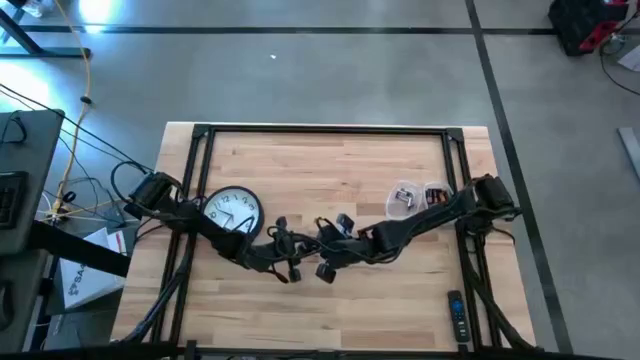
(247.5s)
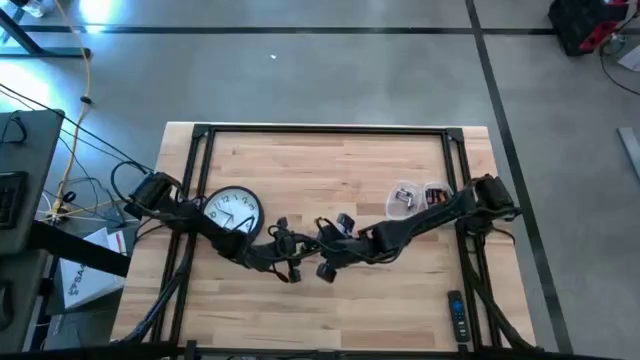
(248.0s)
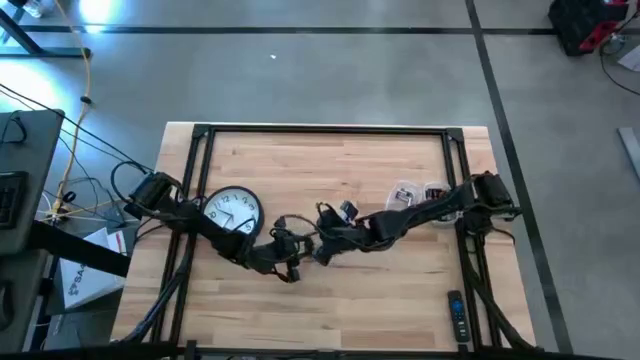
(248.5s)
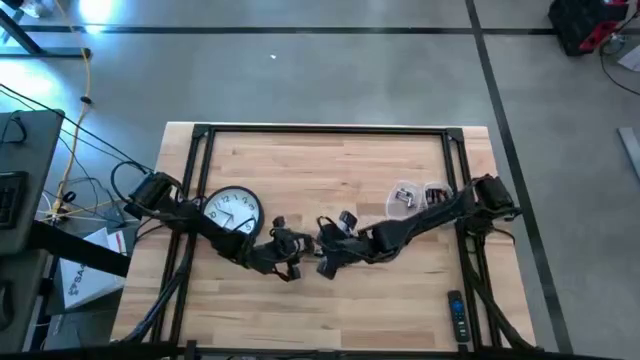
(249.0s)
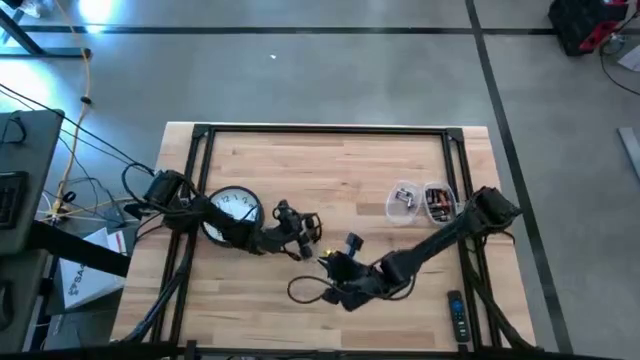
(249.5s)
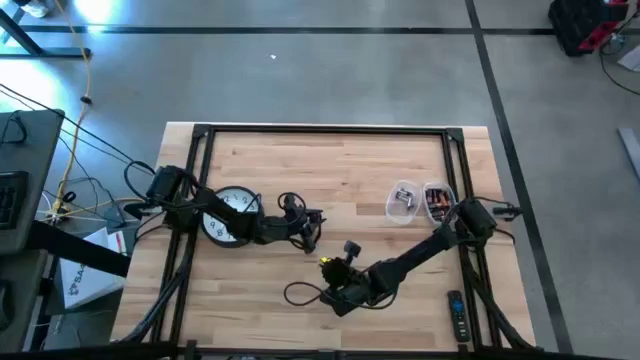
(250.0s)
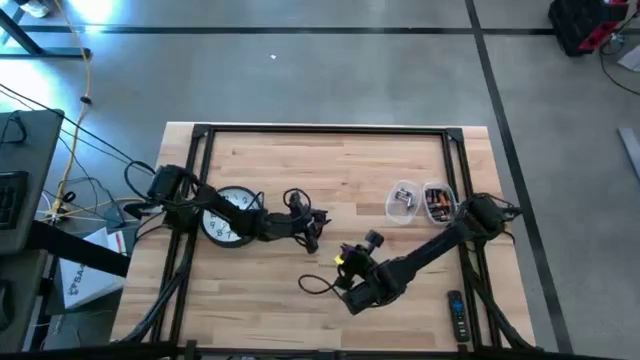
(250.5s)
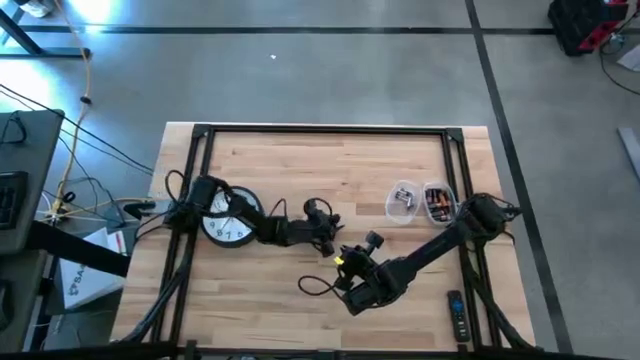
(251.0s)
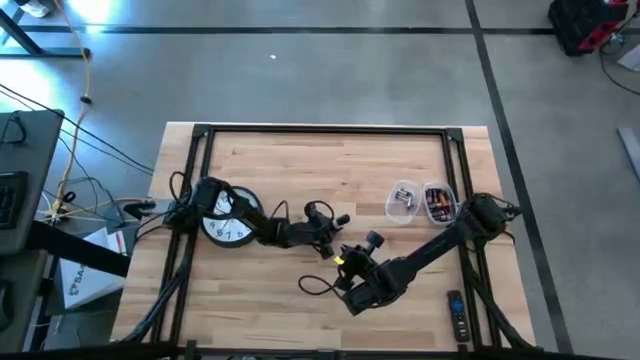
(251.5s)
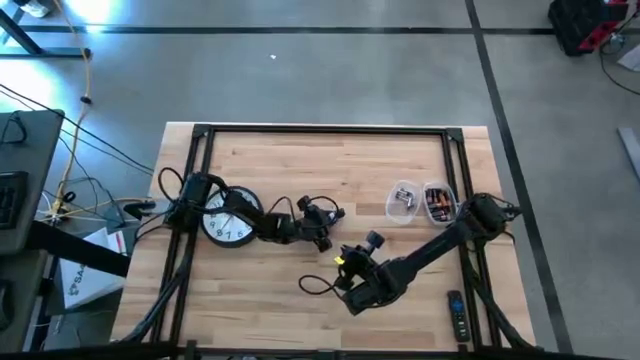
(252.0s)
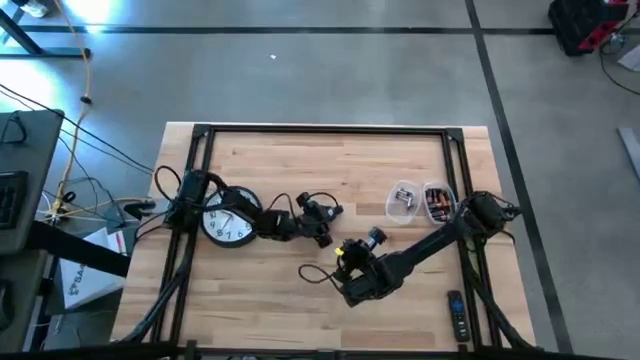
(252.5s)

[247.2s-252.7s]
Task: Insert battery
Put the black flashlight on the table

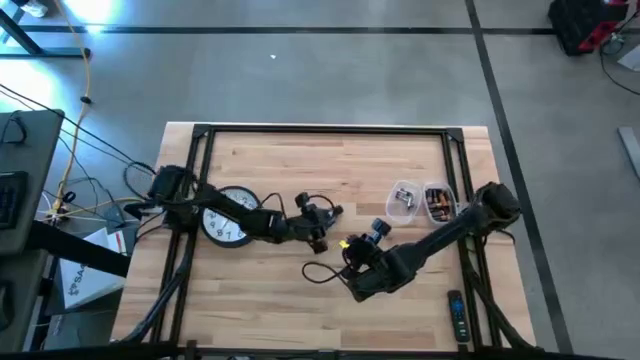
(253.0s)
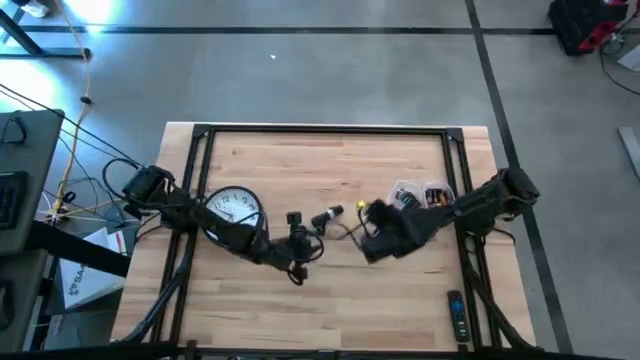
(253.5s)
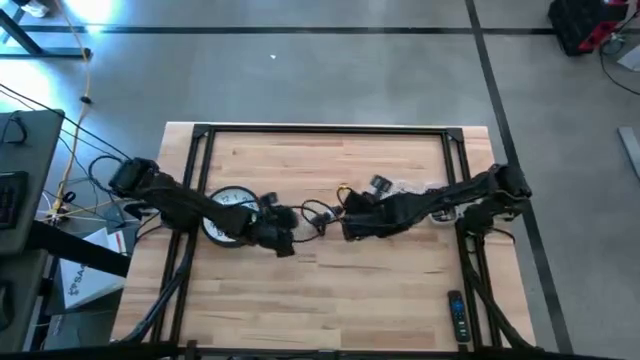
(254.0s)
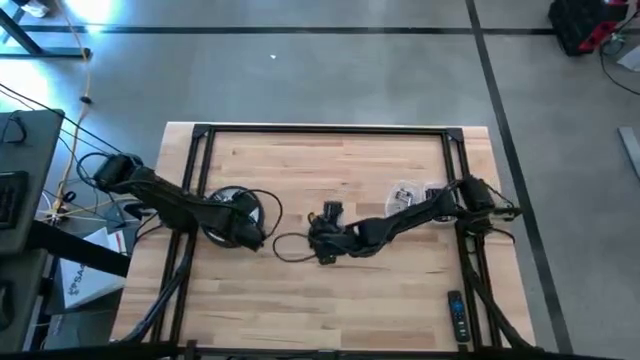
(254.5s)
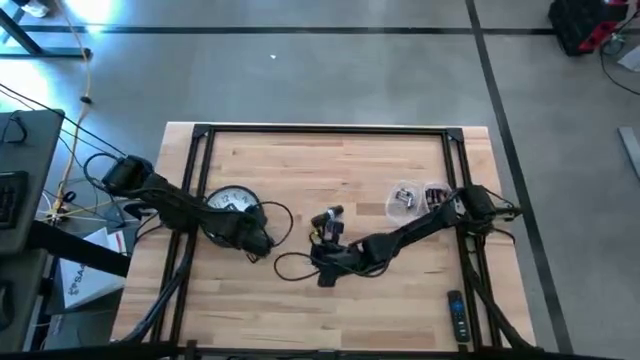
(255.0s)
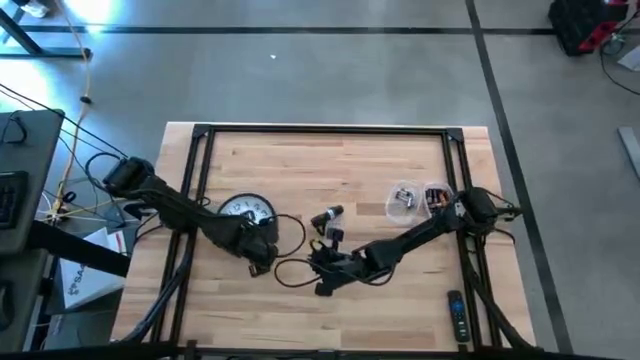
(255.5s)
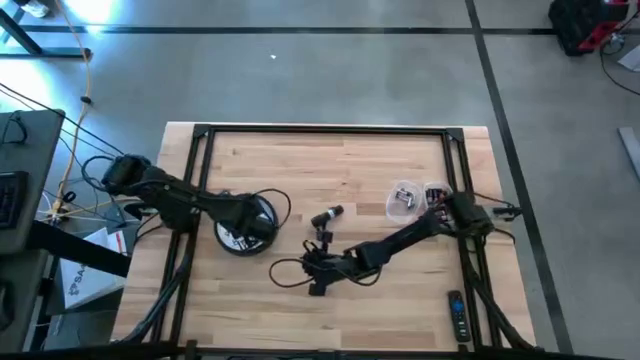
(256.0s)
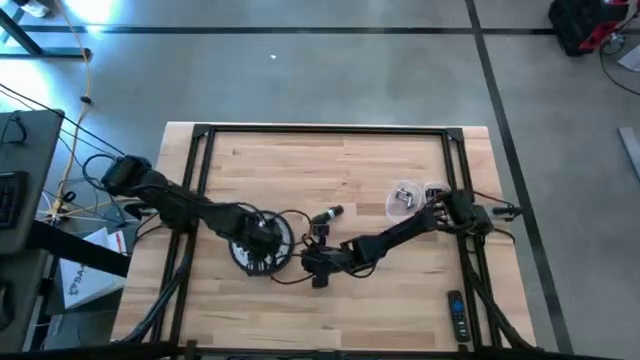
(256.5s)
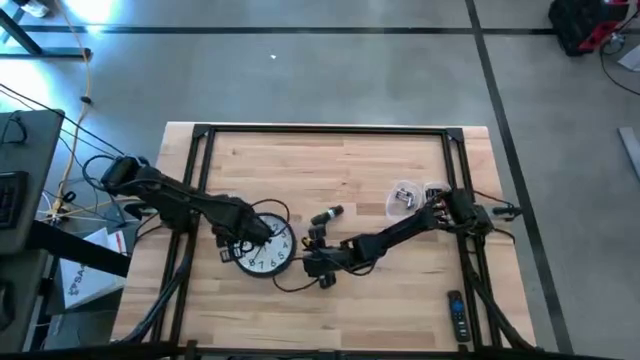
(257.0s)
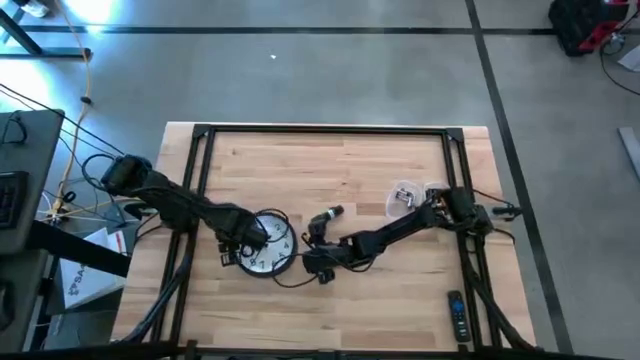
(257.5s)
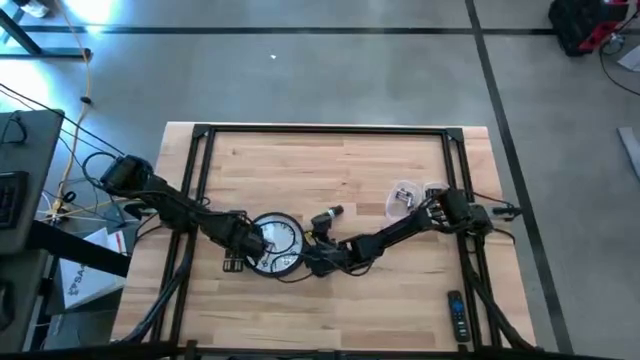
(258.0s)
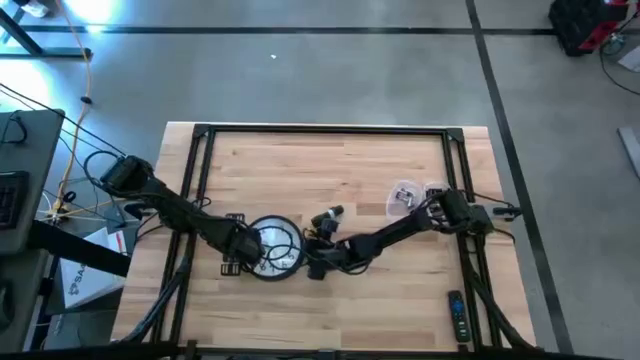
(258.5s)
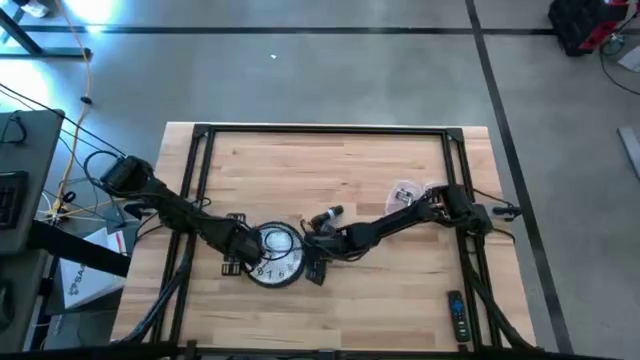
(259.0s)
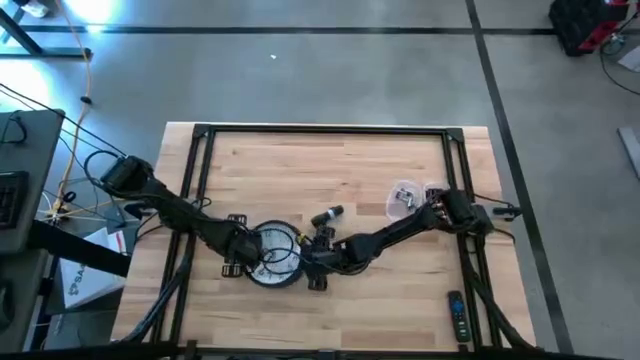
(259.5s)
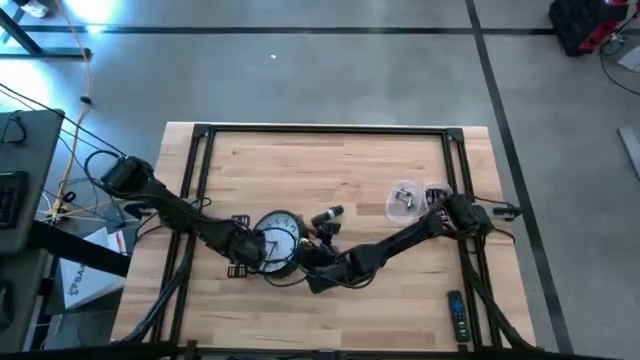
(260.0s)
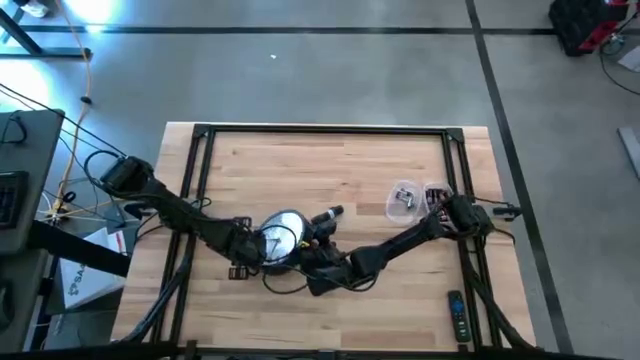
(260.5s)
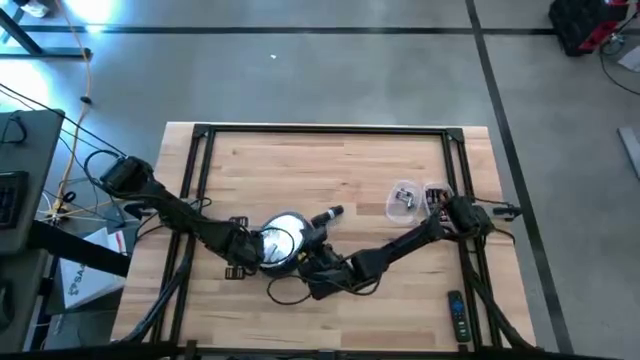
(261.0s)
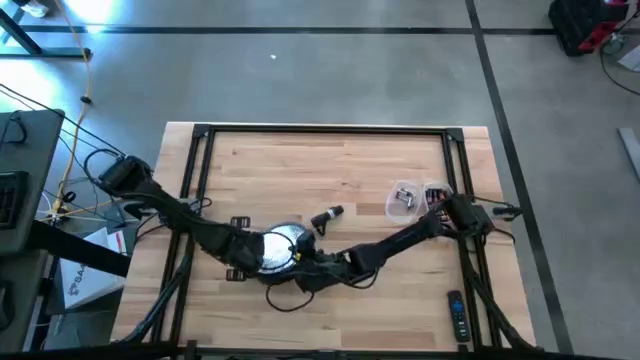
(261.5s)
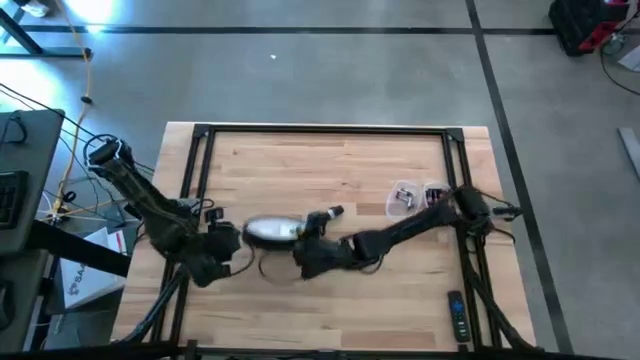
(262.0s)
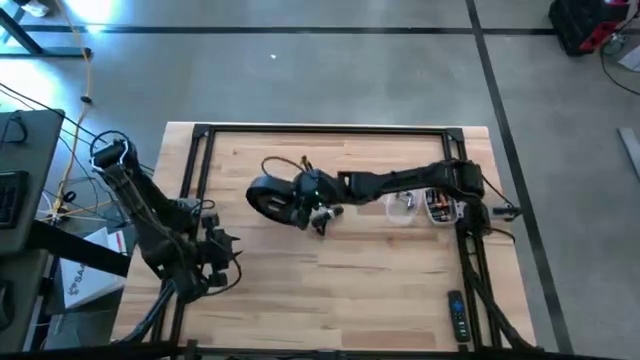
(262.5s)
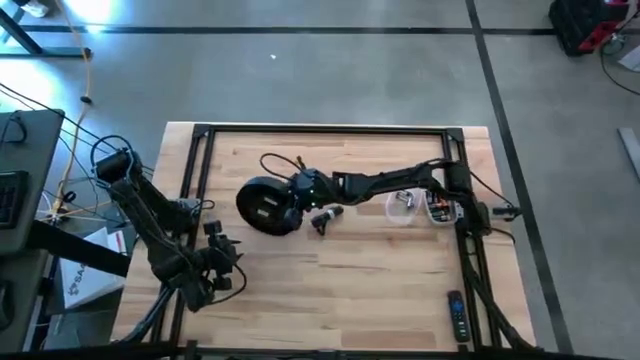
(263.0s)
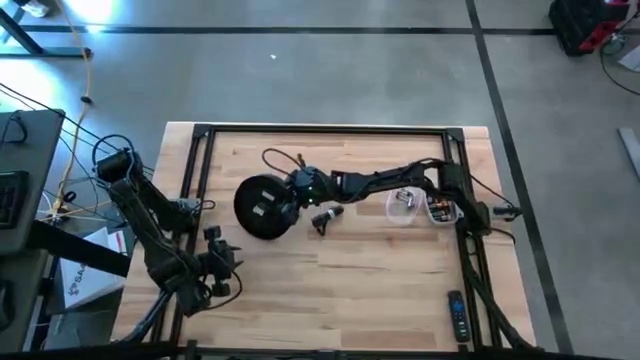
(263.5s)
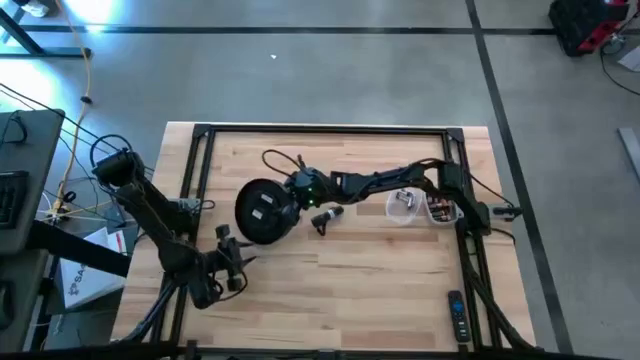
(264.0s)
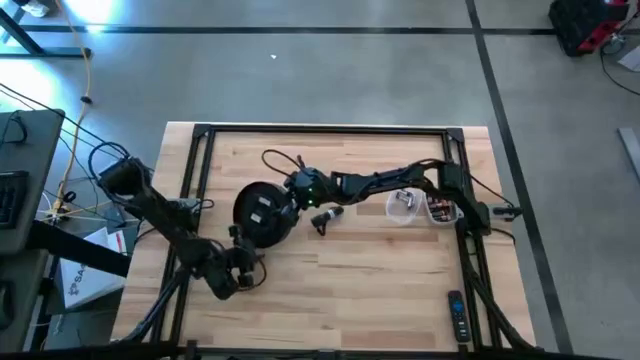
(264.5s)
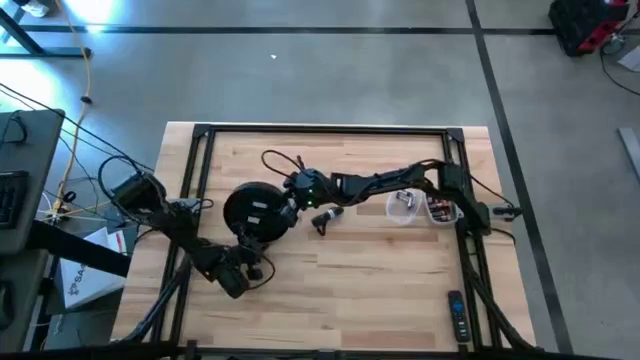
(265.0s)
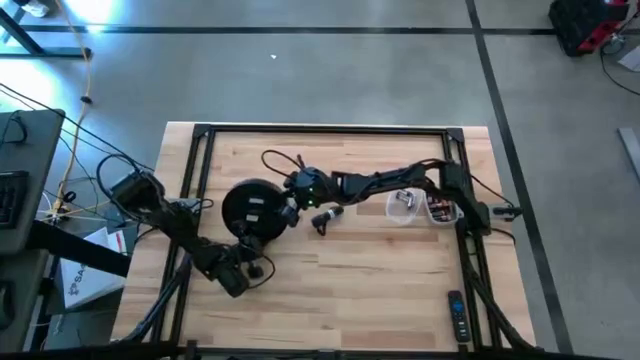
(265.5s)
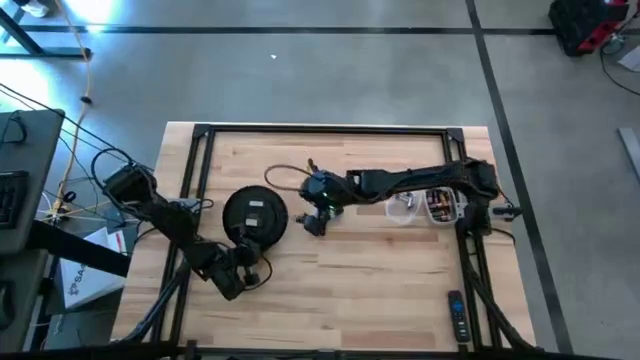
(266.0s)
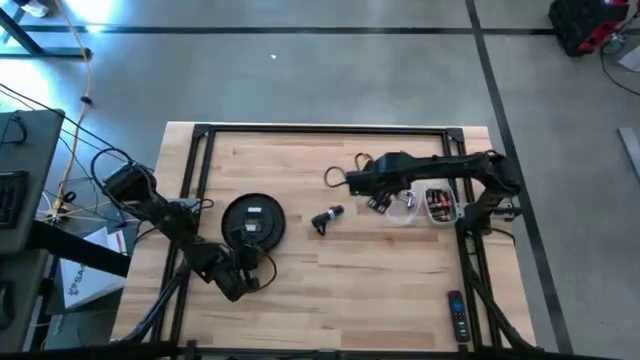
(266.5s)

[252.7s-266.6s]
Put the black wall clock on the table upside down
